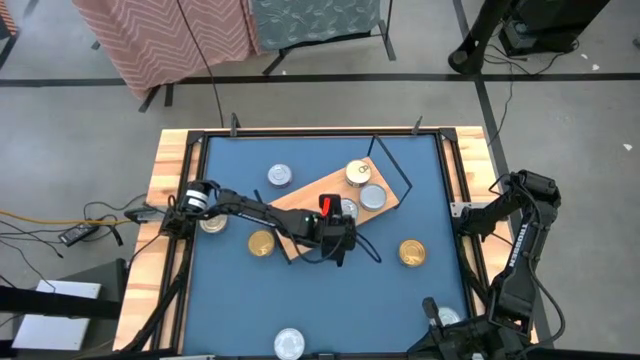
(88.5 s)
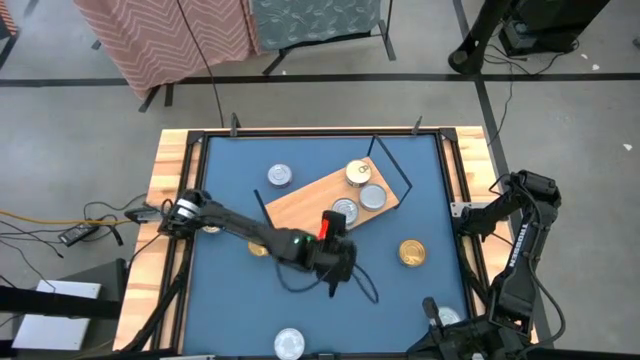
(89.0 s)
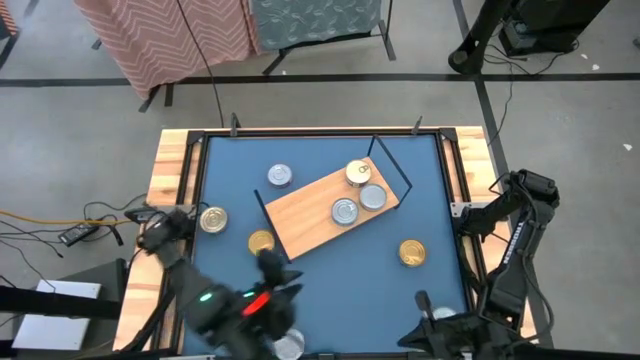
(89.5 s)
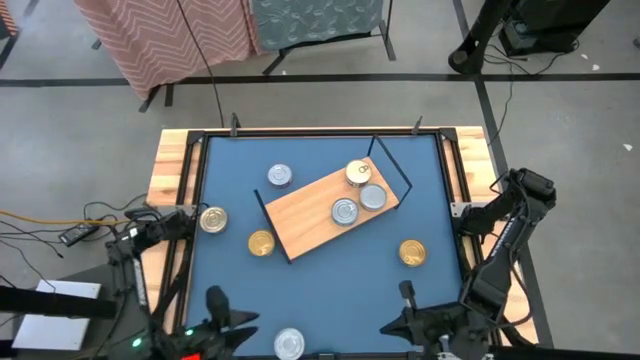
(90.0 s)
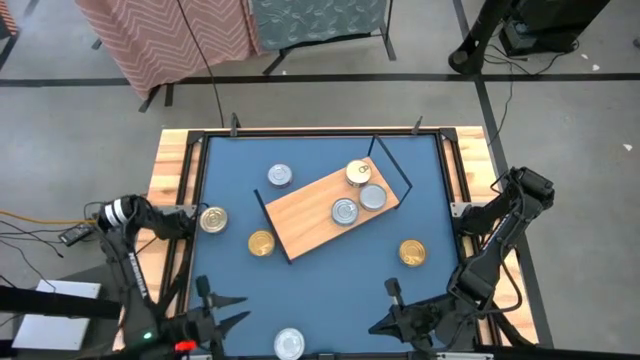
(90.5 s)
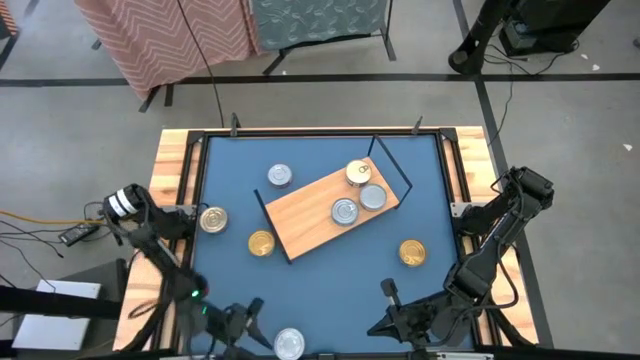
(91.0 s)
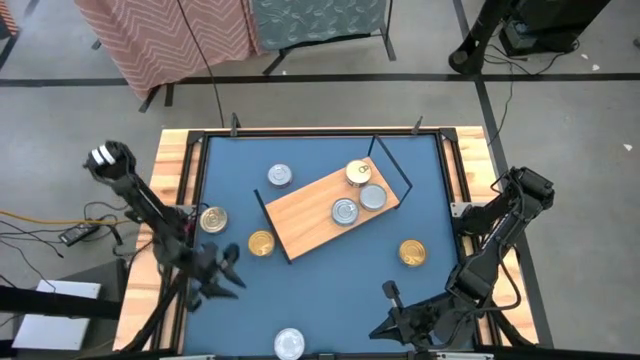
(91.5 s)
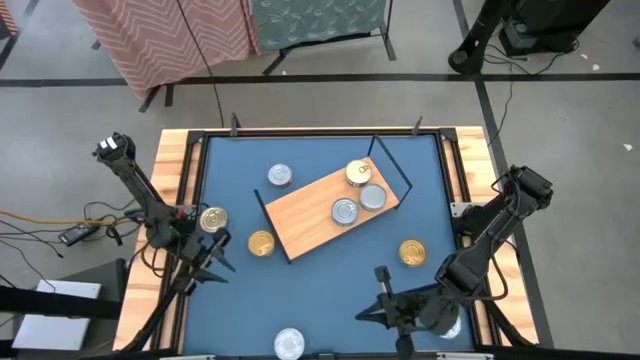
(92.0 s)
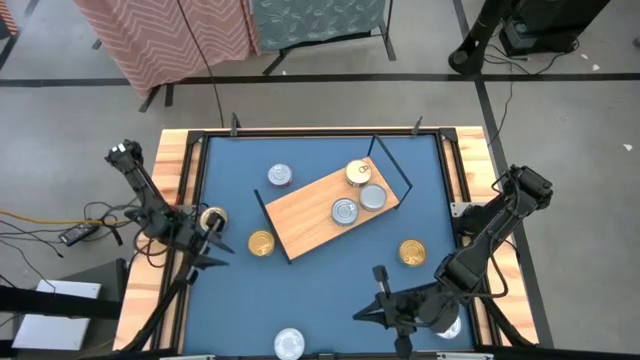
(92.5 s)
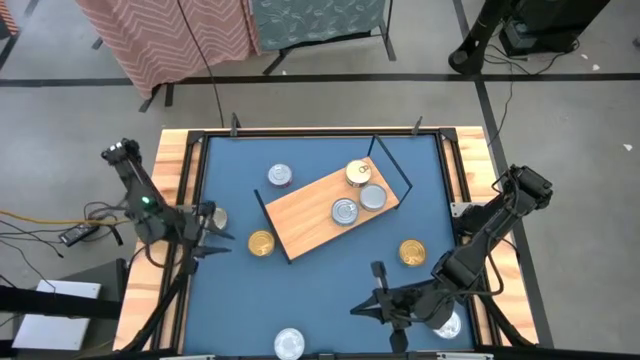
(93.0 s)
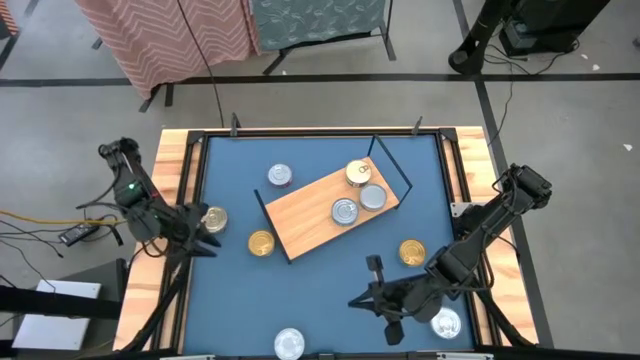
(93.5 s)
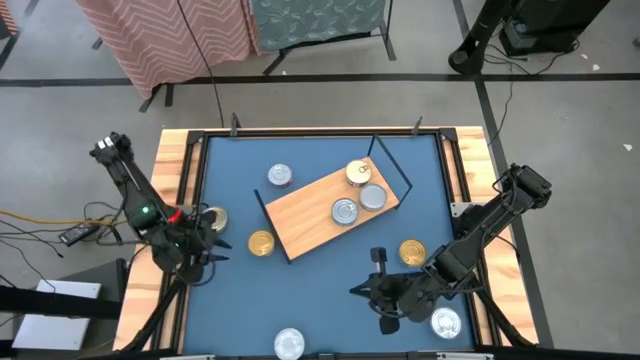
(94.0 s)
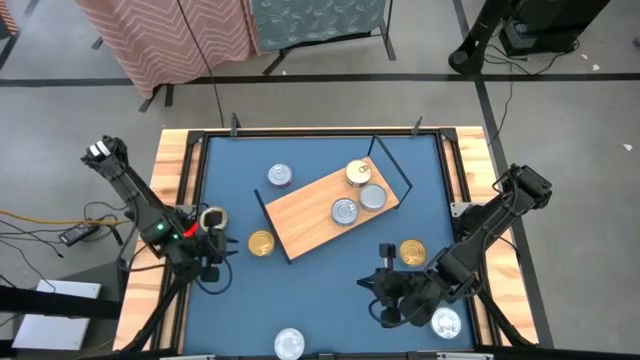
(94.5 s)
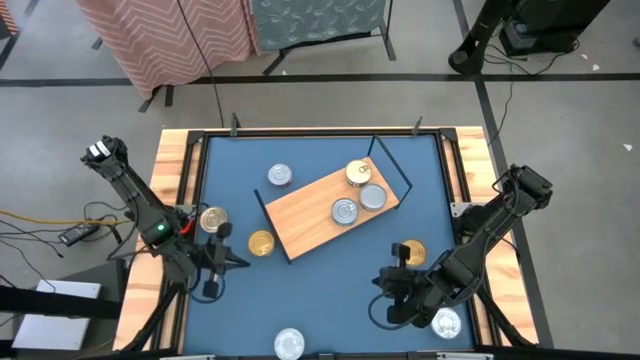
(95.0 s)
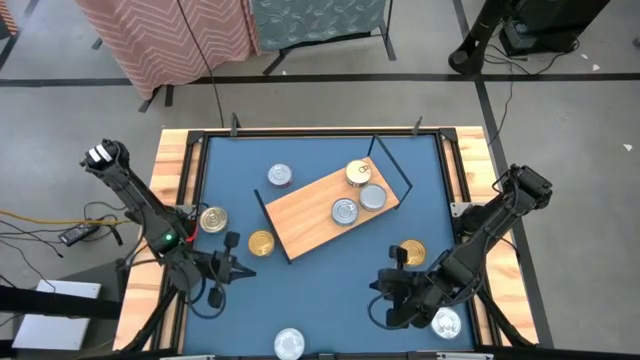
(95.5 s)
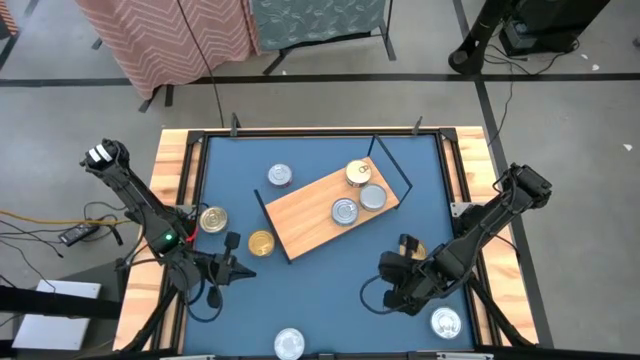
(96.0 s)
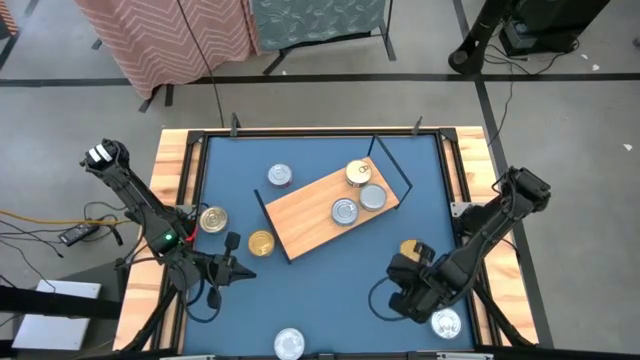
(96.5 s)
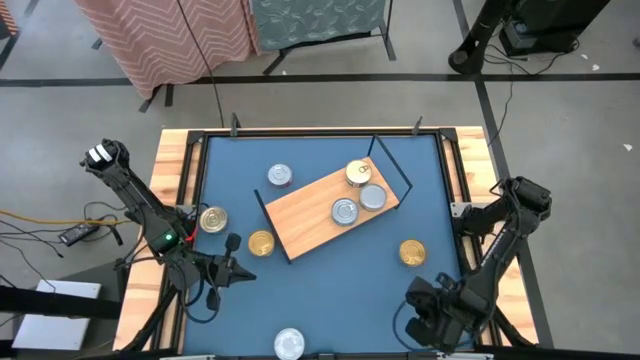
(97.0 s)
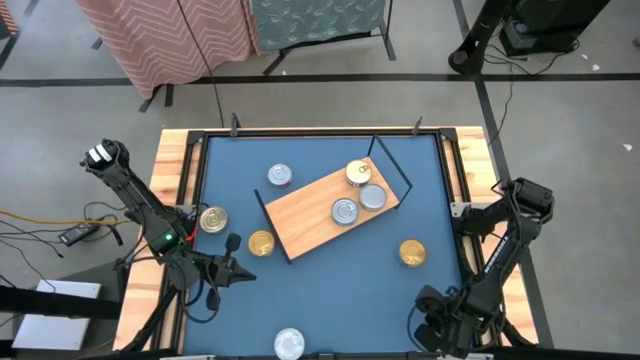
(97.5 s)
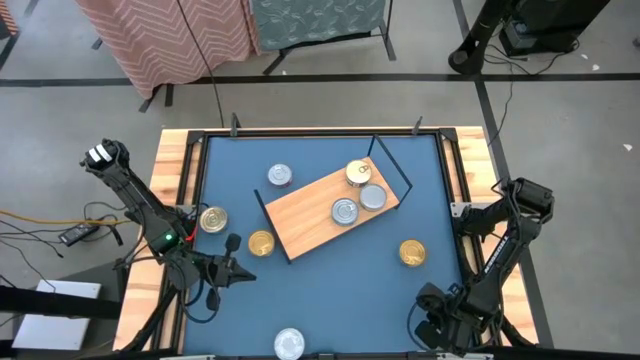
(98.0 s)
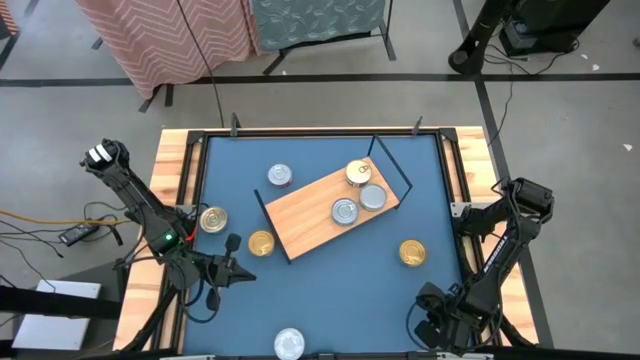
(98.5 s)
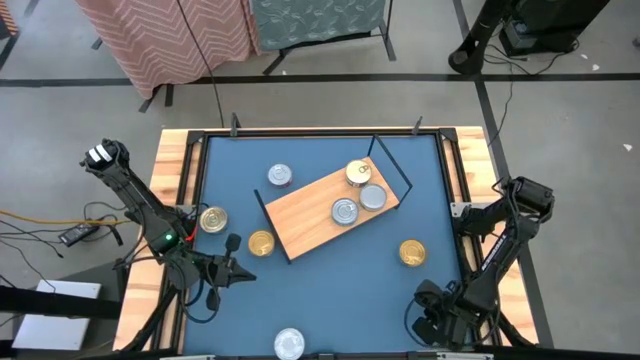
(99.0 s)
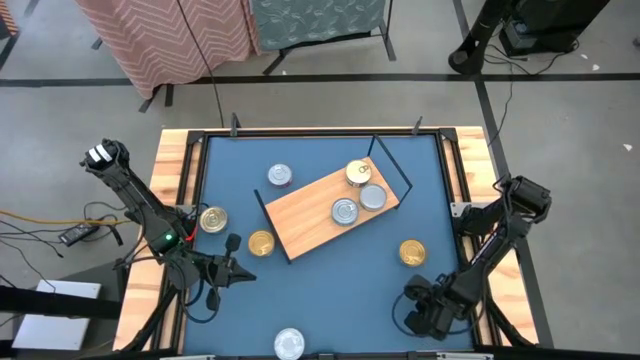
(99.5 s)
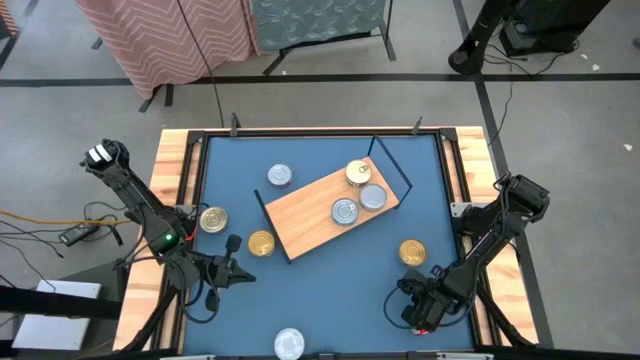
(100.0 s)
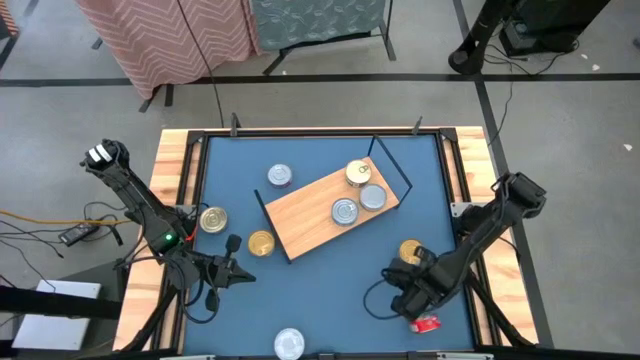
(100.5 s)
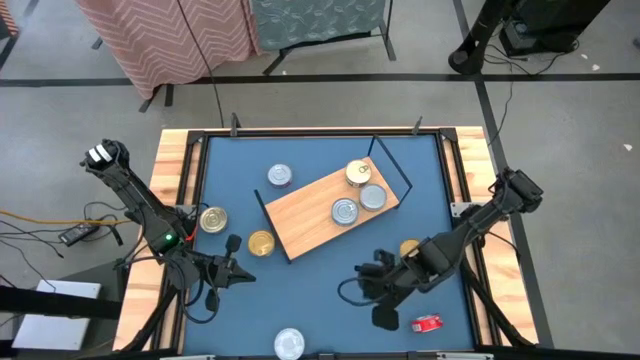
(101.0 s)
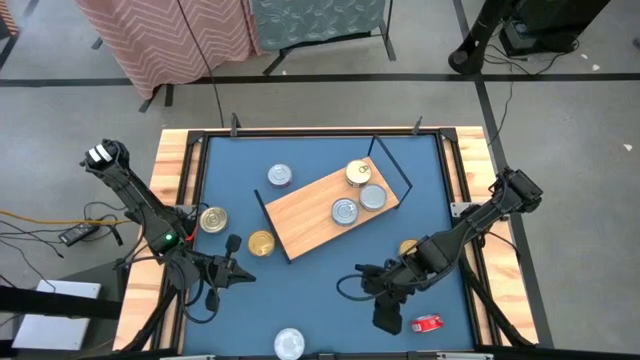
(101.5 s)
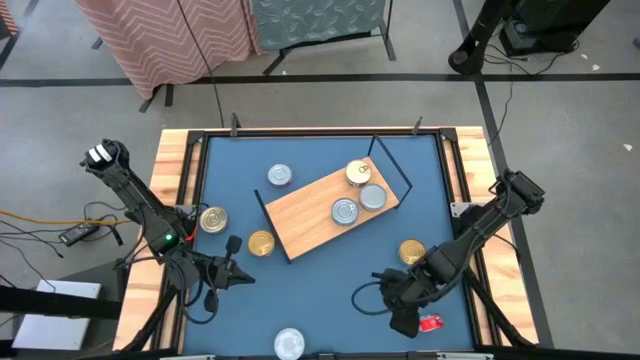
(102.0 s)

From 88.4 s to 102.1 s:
Task: Stack canned seafood by type on shelf
Put the red tuna can on the shelf

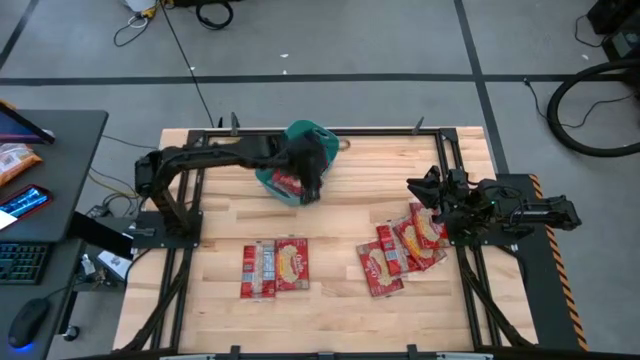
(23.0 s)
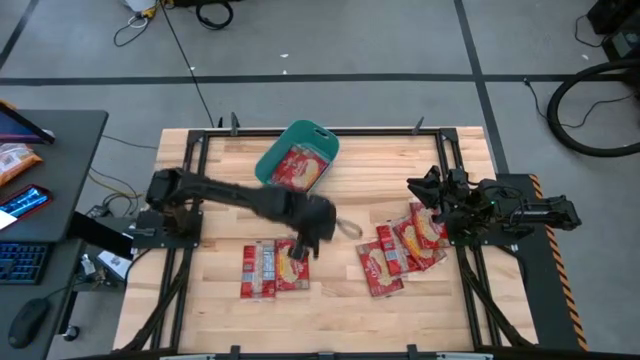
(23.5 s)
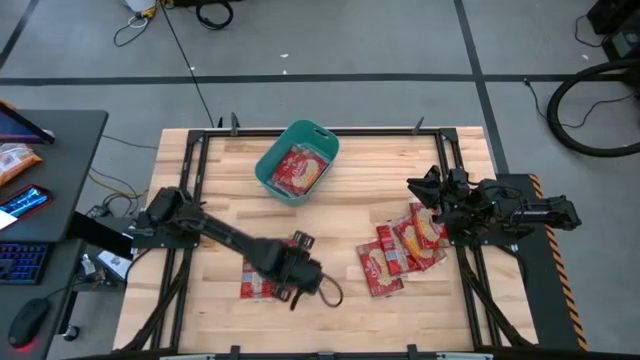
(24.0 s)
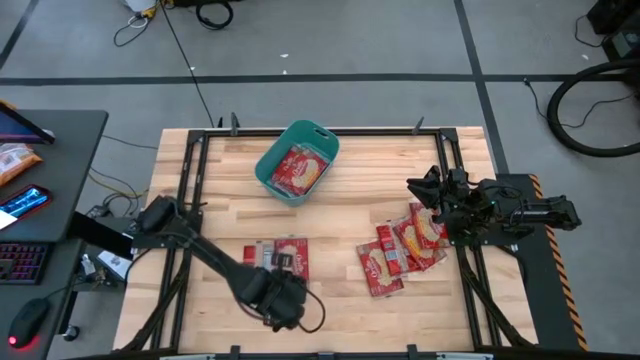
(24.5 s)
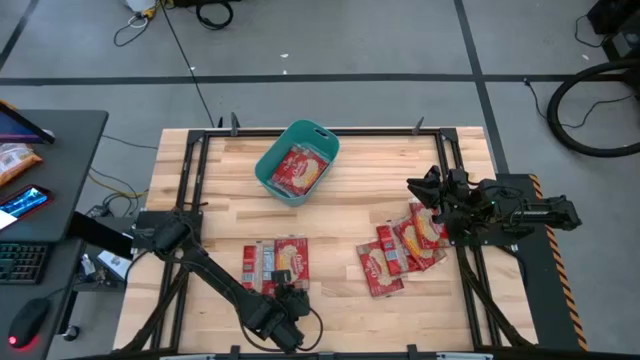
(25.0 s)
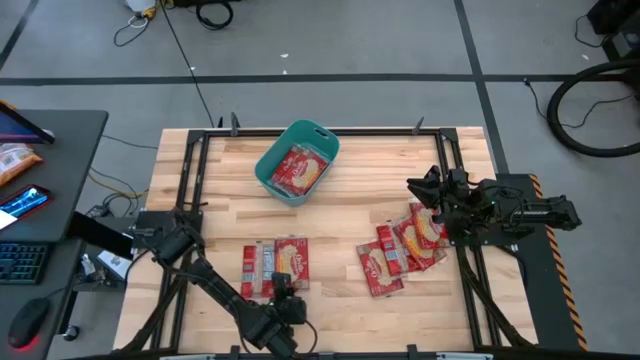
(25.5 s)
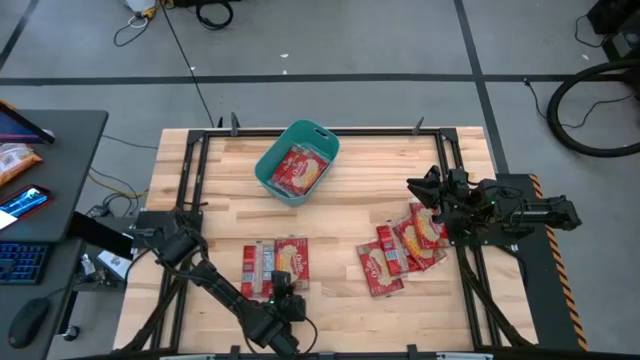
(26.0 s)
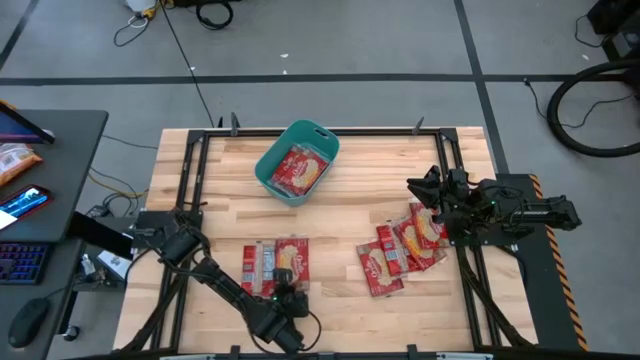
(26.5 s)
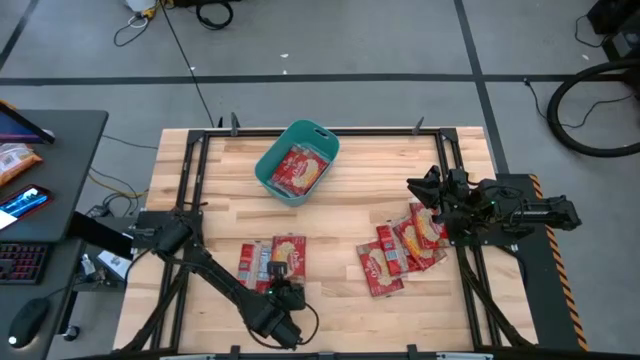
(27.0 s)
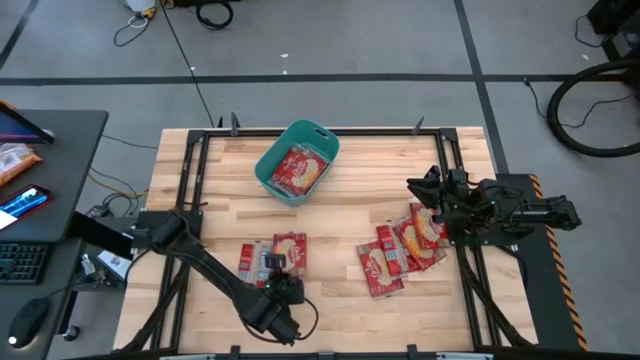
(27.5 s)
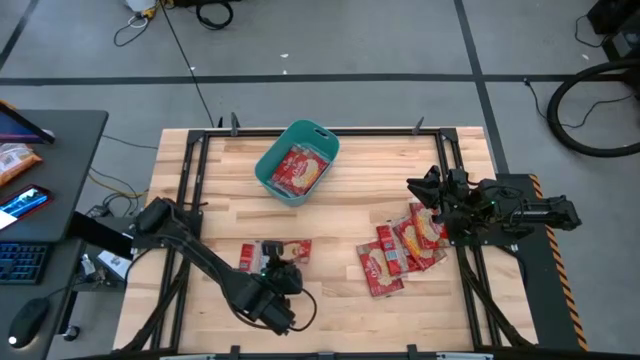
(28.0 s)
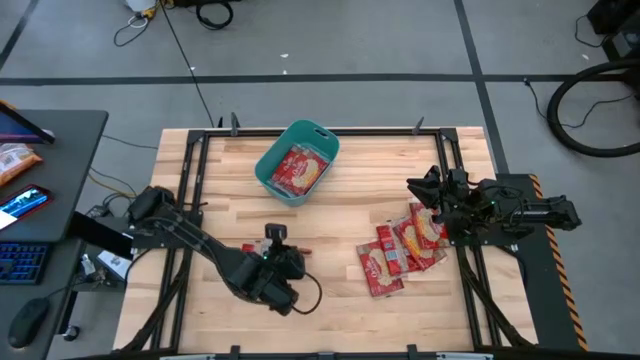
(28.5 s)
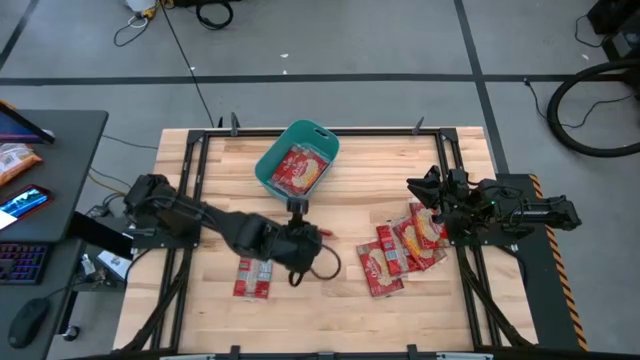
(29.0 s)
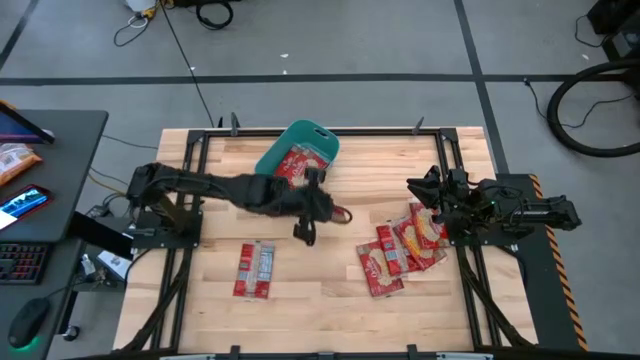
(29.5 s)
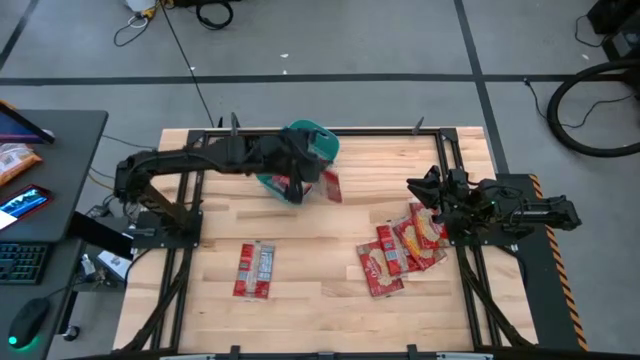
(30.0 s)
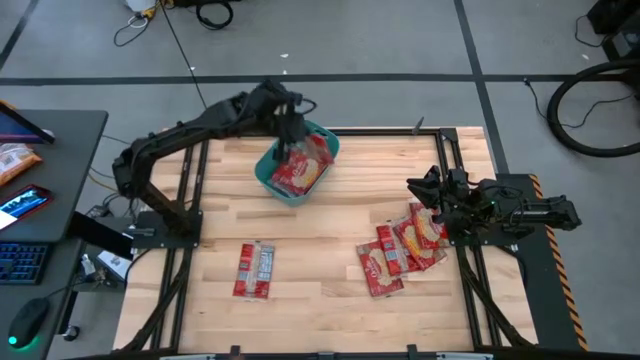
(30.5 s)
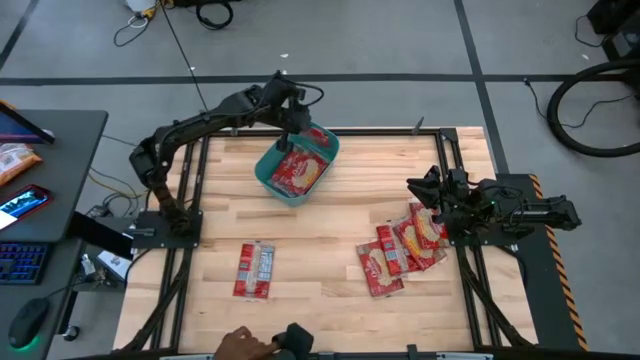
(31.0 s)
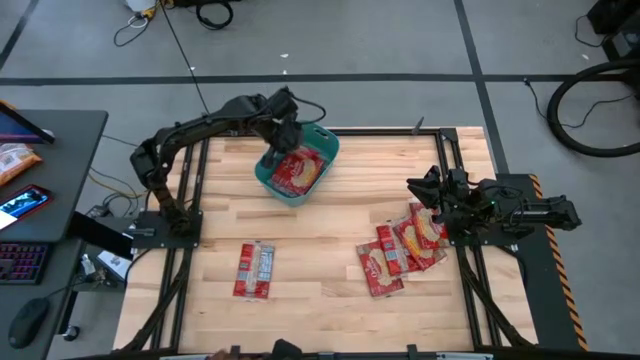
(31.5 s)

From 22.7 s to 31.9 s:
Task: Sort popcorn bags into baskets
Put the red popcorn bag into the blue bin
